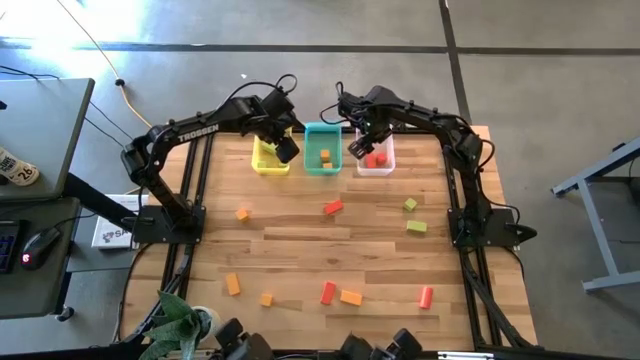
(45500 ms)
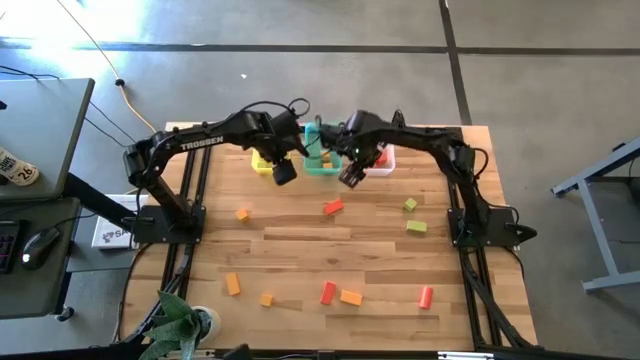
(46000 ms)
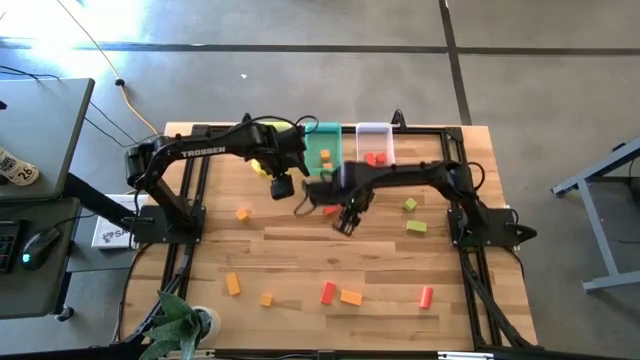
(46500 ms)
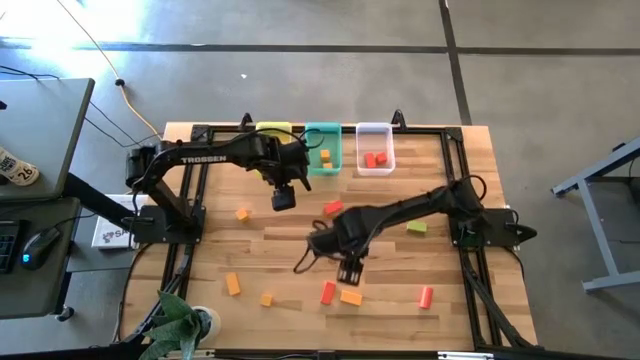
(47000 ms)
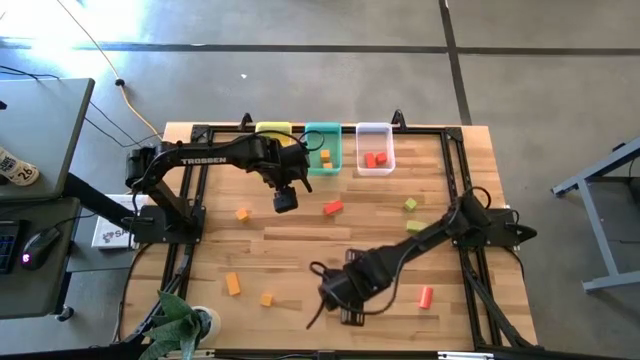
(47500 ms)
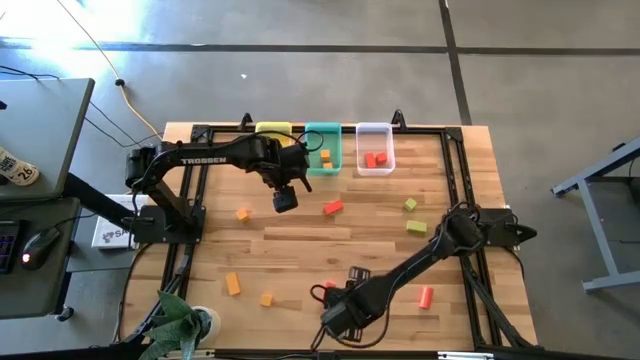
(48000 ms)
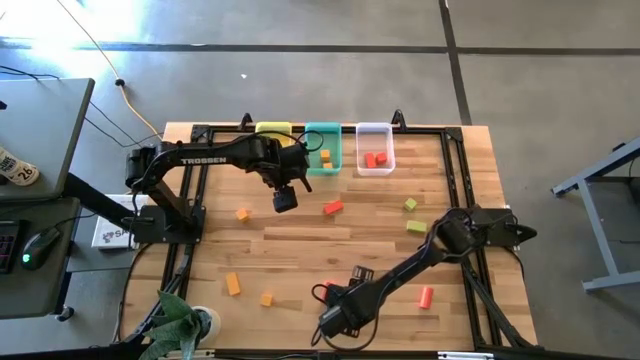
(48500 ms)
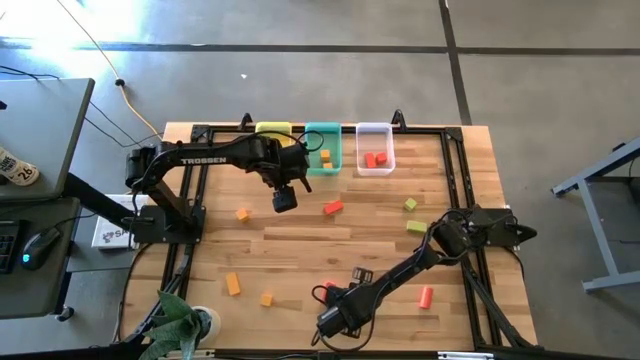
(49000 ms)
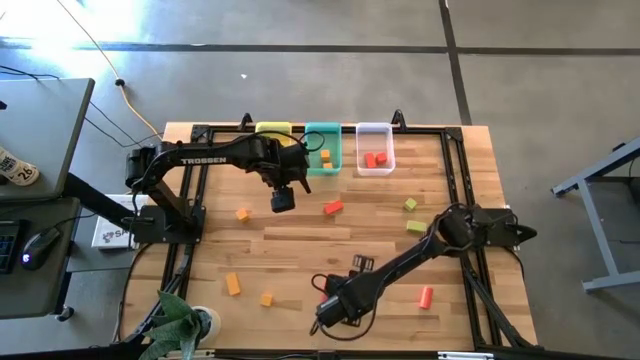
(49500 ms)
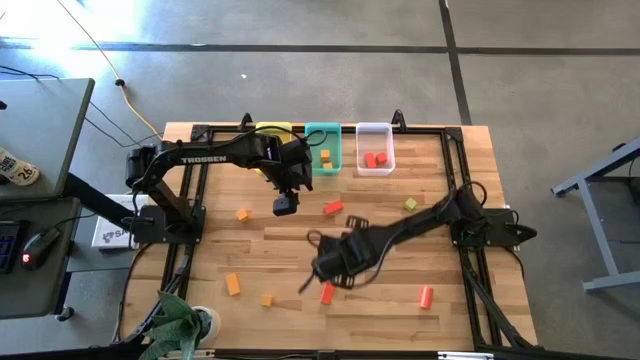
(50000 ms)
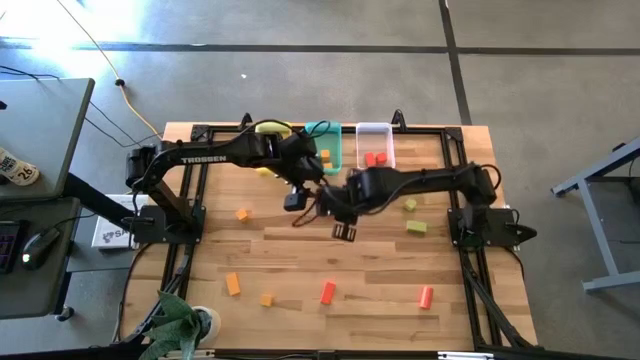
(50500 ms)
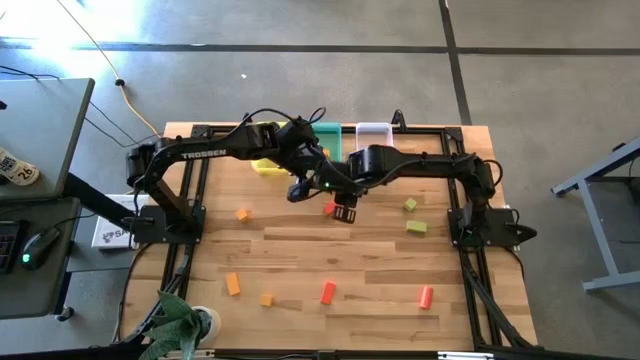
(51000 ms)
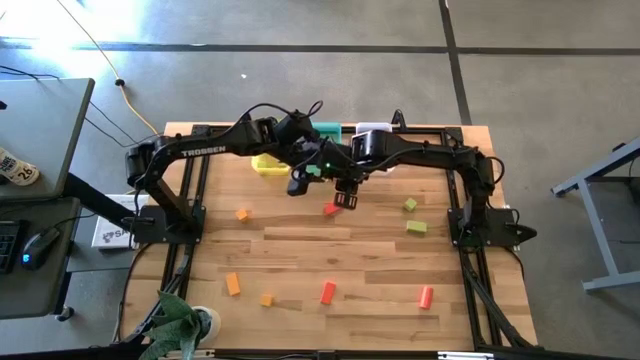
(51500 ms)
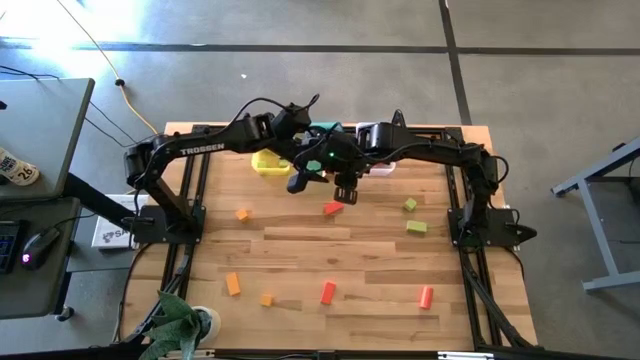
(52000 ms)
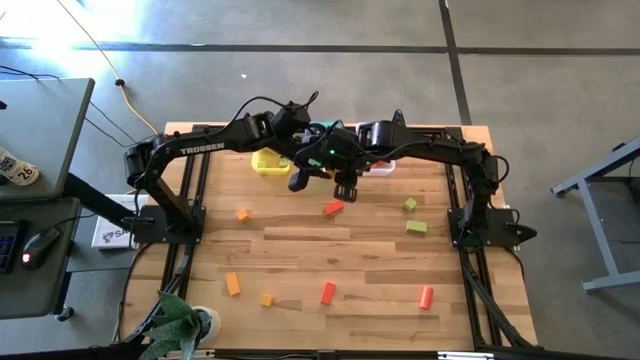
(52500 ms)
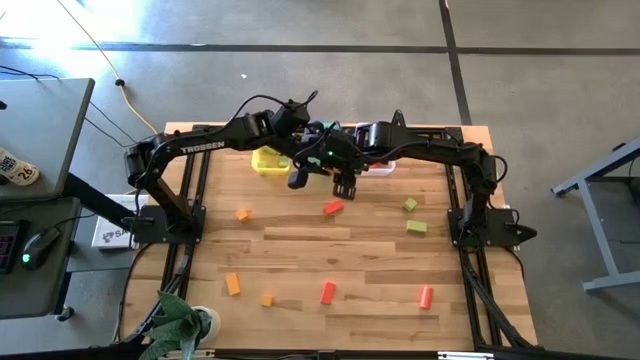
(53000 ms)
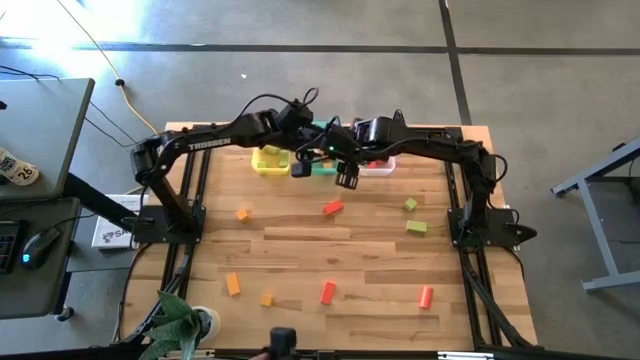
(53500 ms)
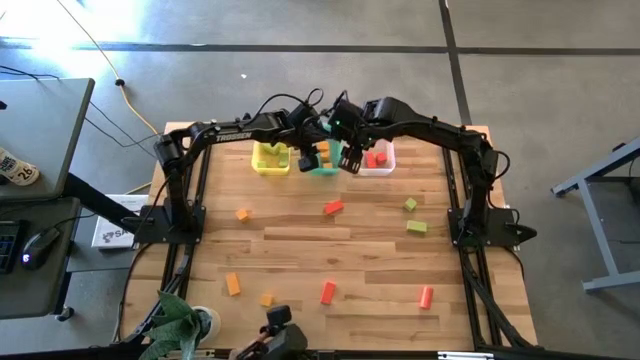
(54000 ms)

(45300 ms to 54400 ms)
Task: Sort & place blocks by color
Put the yellow block into the blue bin

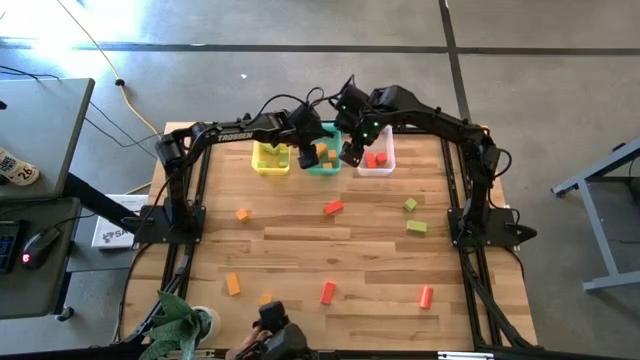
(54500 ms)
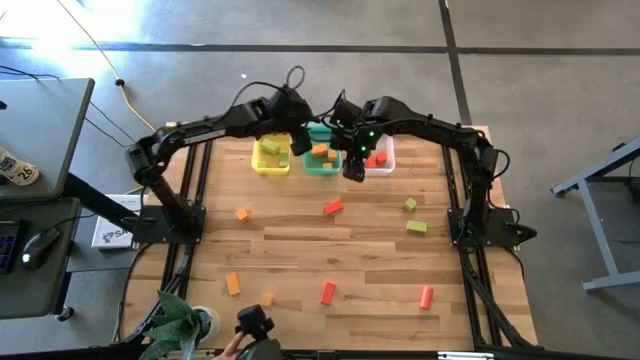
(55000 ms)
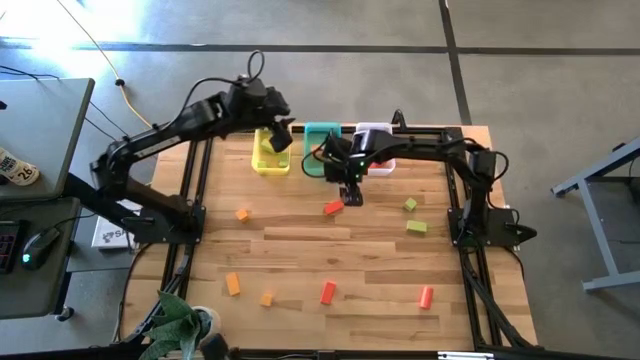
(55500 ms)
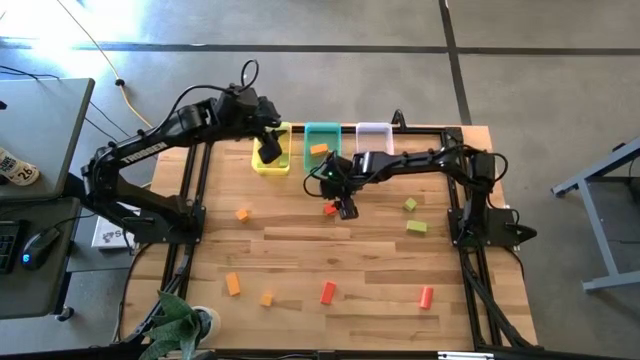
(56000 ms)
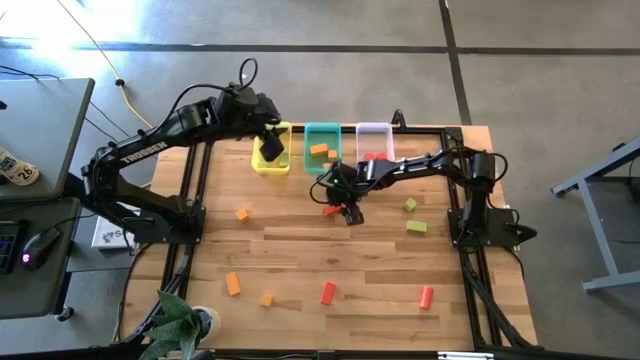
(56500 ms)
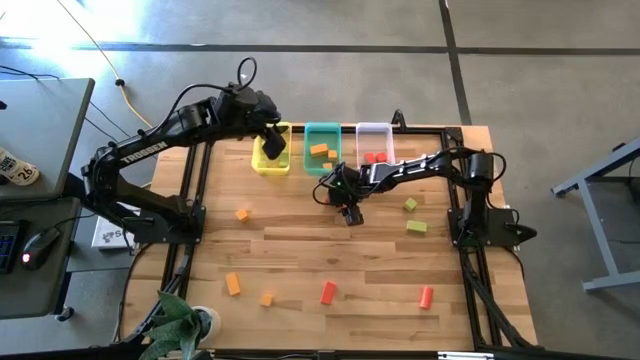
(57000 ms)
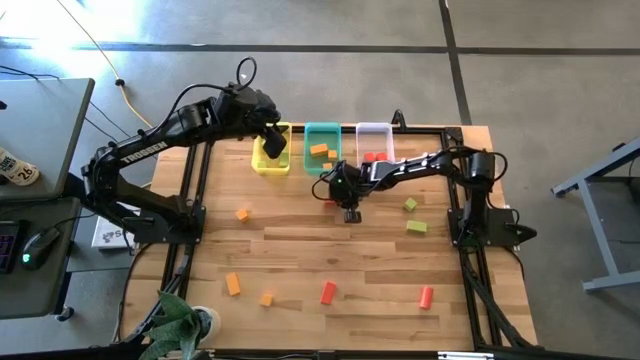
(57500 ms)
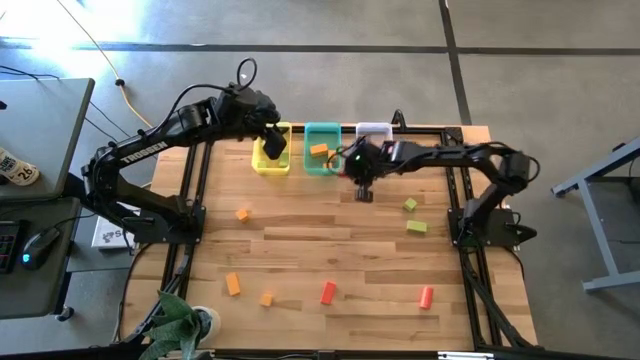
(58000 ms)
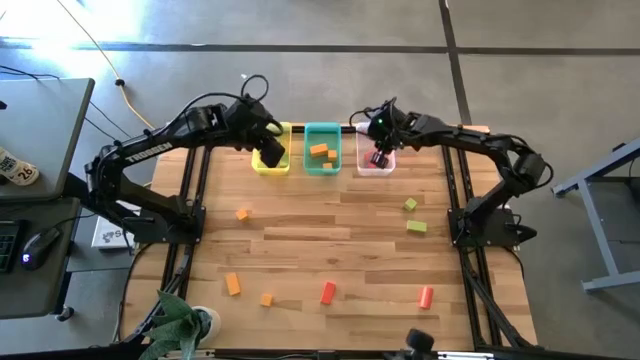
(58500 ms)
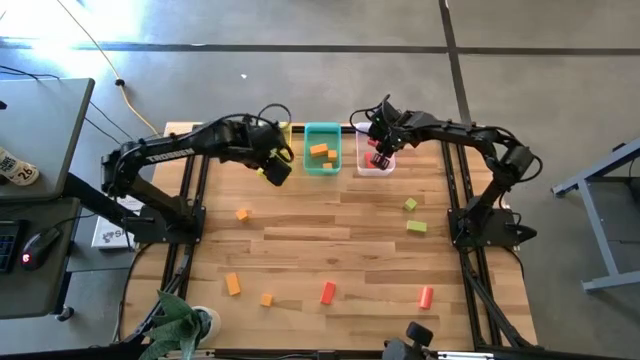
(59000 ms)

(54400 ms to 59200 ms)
Put the orange block into the white bin

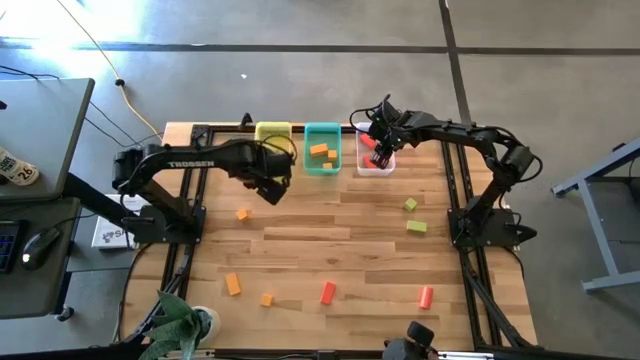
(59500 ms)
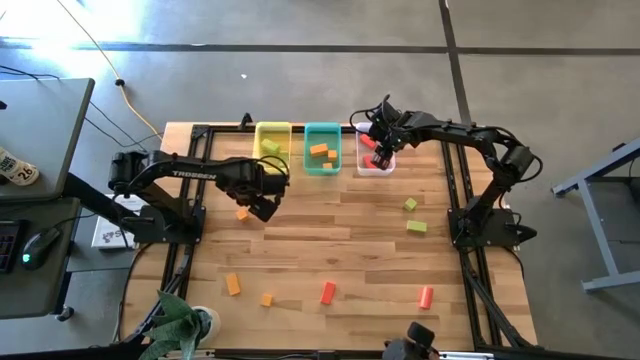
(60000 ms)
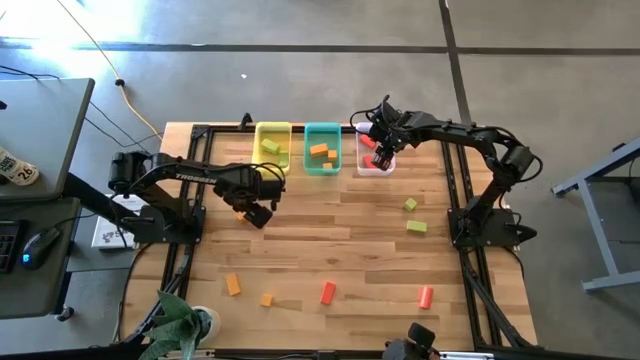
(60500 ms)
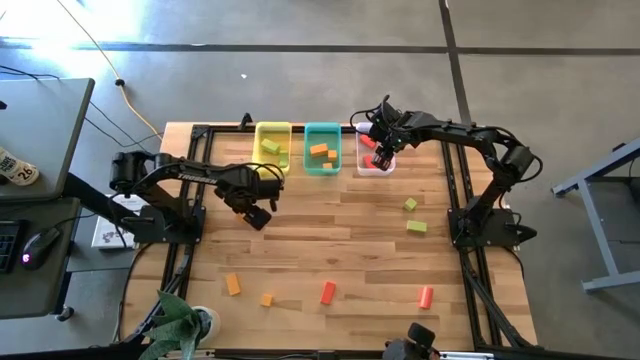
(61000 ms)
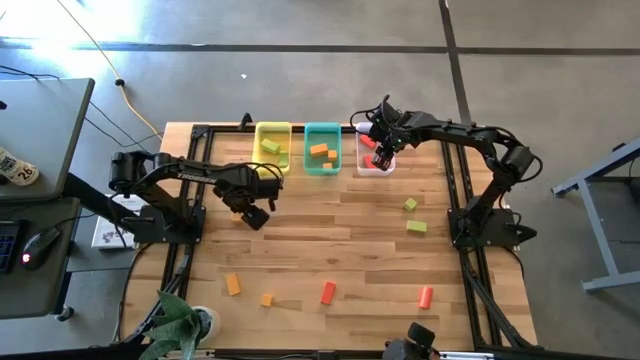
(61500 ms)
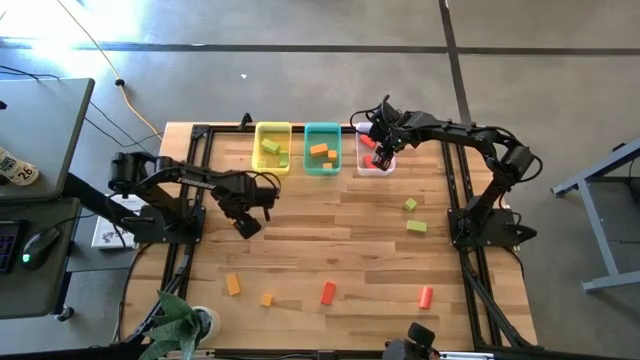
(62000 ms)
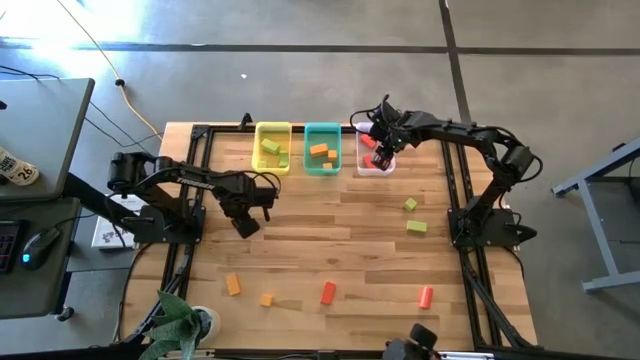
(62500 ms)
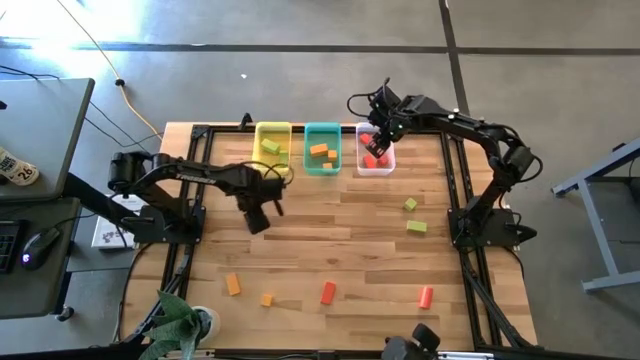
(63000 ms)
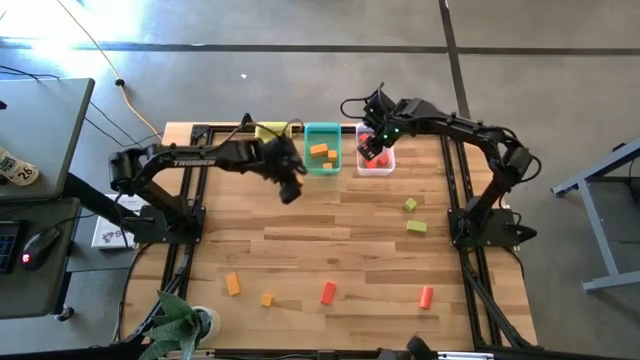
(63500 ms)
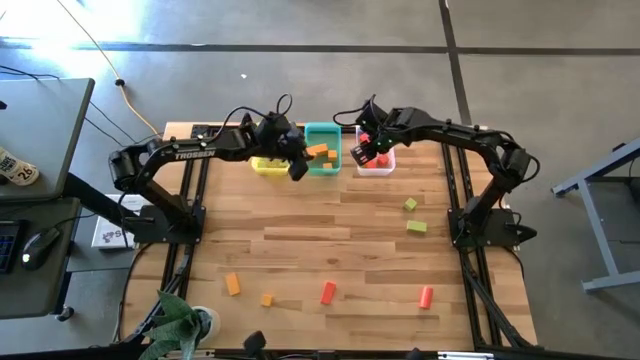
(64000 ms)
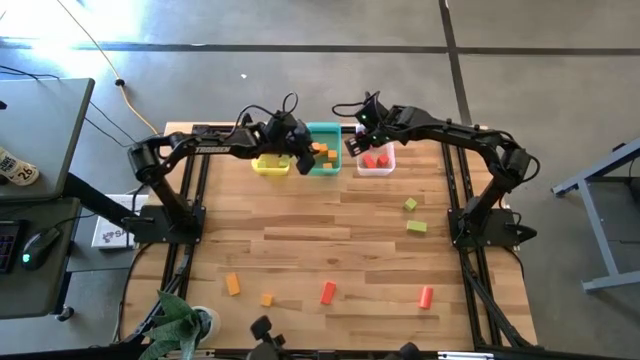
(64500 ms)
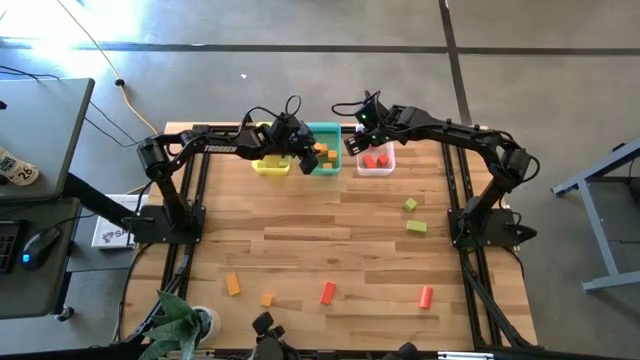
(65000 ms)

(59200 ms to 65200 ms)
Put the yellow block into the blue bin
